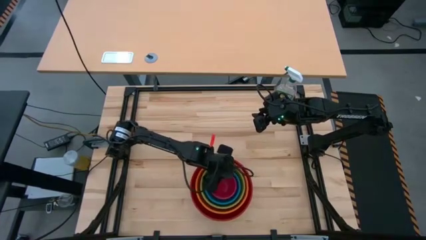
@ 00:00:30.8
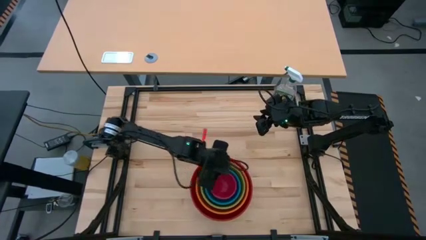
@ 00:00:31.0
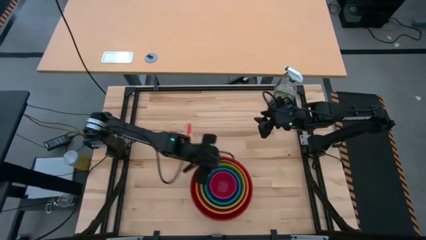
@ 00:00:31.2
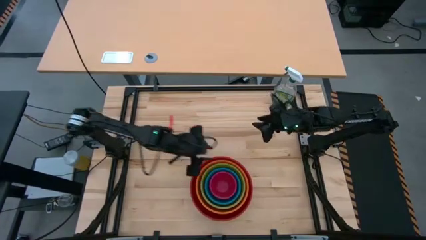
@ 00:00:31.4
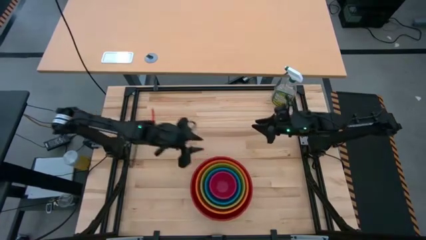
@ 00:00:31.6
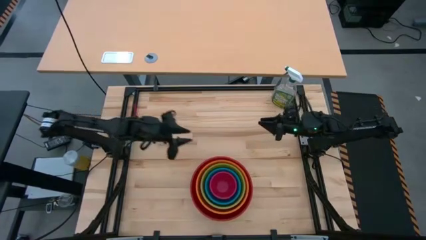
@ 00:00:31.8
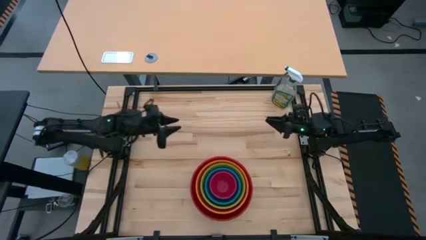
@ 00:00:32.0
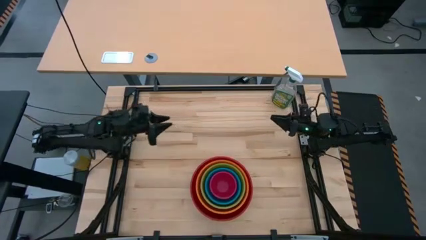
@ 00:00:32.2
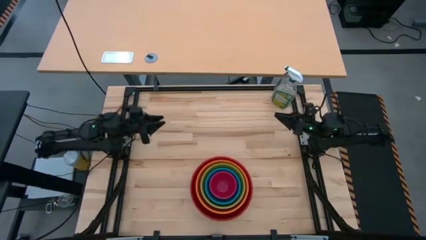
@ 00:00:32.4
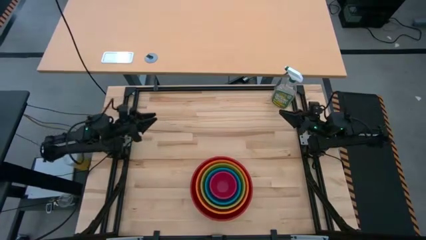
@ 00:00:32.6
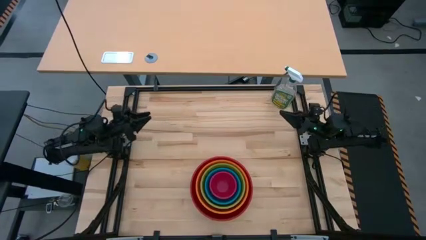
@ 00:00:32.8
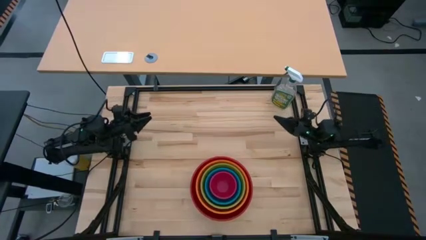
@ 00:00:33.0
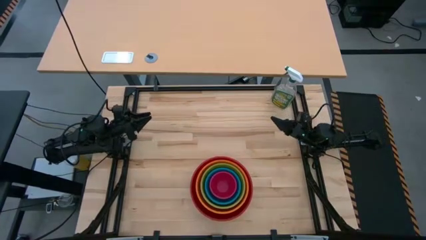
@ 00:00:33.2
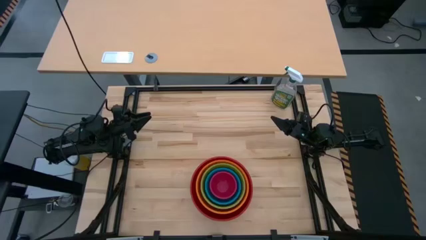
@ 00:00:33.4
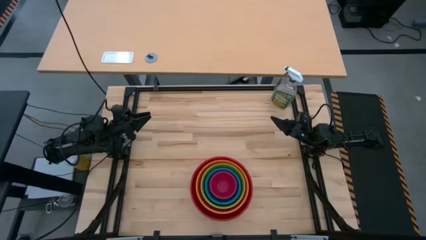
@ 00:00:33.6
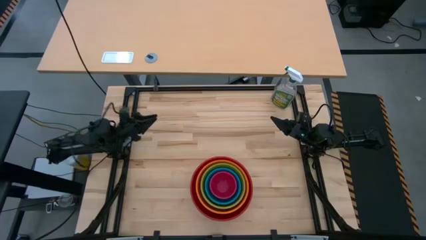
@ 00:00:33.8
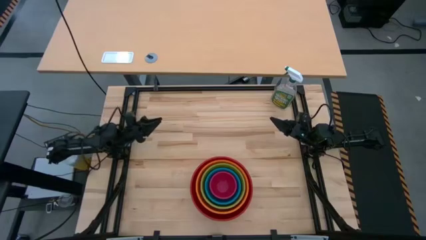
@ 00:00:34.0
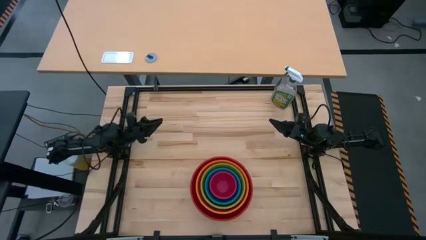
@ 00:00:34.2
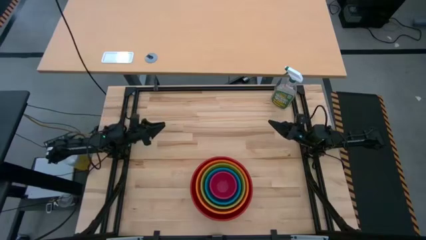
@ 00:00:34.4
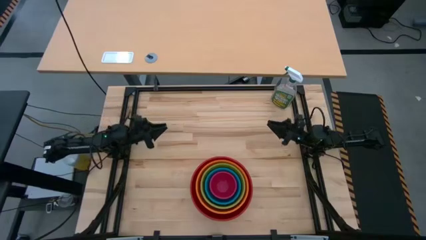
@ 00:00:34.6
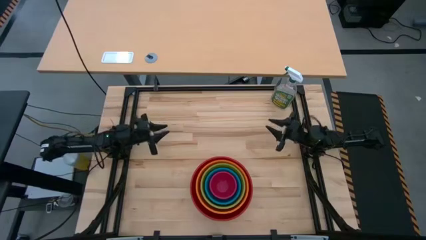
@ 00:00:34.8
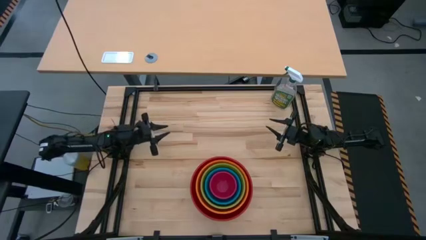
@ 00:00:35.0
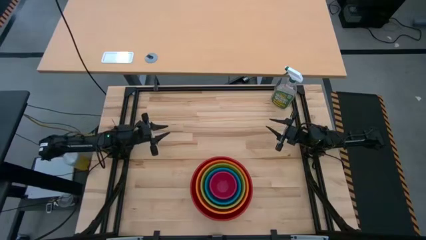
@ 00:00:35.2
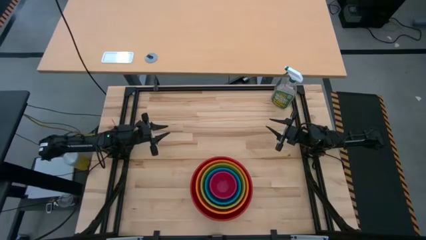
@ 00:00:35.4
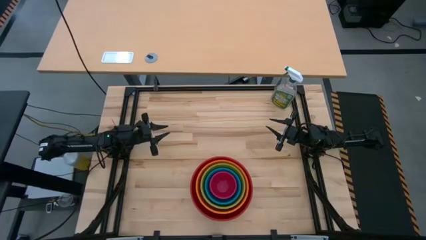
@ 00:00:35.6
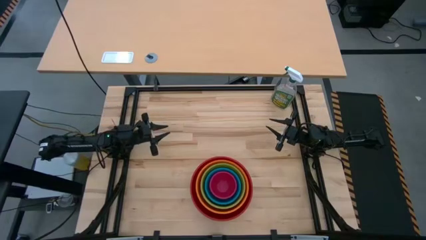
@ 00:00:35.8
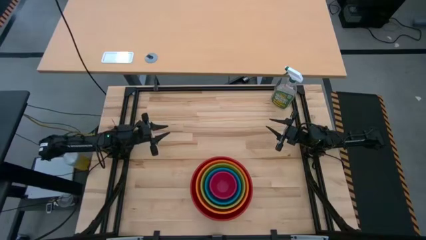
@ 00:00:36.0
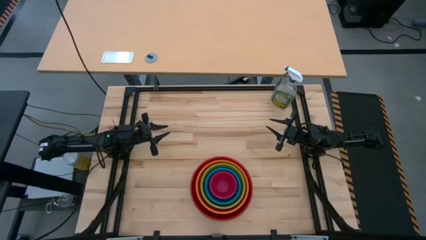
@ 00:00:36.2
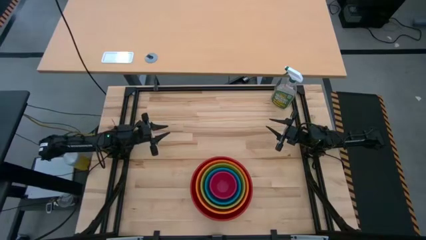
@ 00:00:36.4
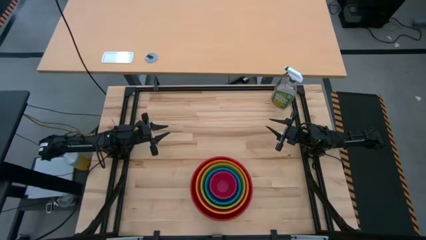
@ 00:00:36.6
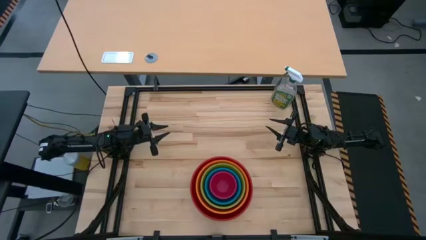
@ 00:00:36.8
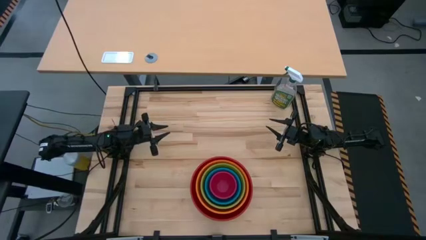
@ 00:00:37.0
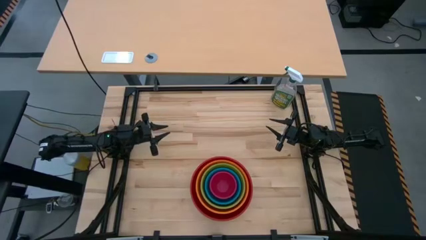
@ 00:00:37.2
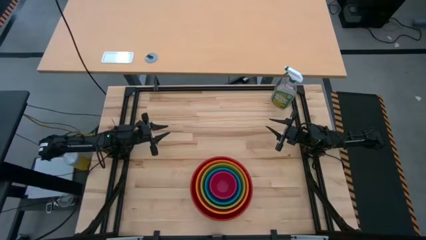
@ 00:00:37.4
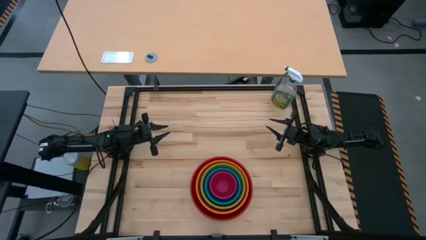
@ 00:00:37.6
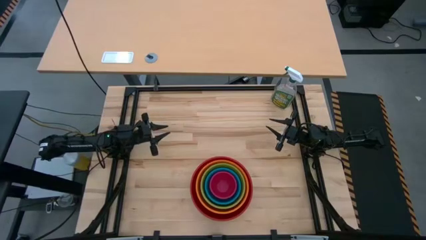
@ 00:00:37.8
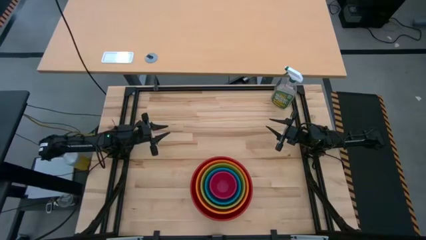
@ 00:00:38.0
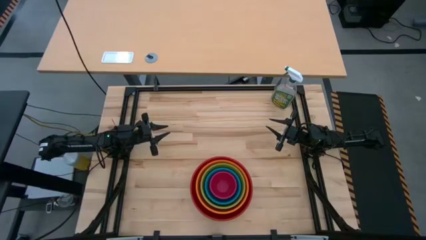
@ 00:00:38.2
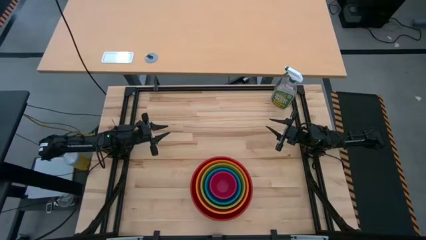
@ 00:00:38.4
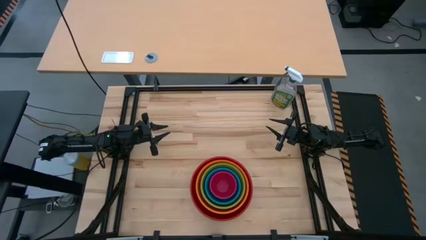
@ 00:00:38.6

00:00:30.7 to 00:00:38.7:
Return to Home Position

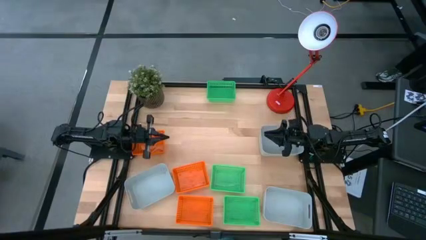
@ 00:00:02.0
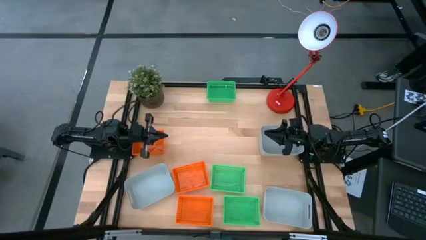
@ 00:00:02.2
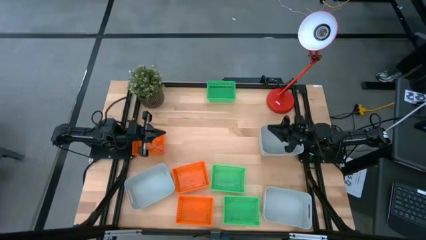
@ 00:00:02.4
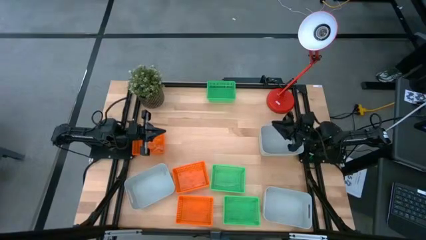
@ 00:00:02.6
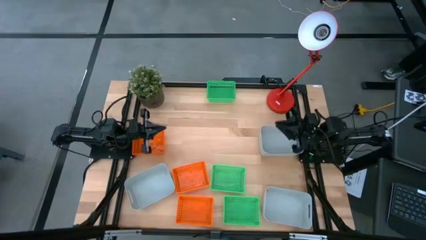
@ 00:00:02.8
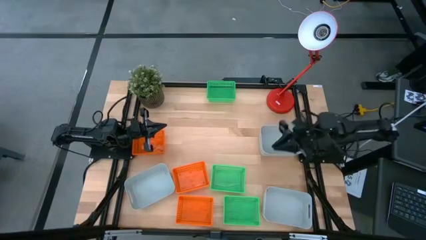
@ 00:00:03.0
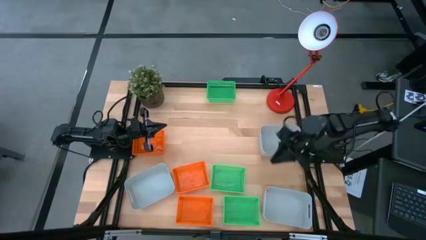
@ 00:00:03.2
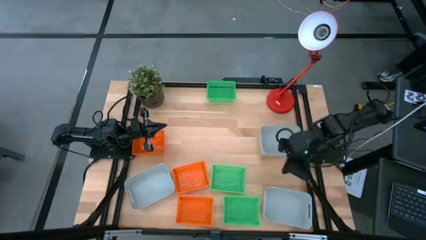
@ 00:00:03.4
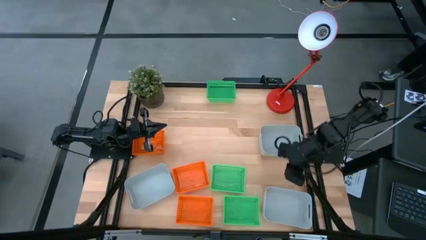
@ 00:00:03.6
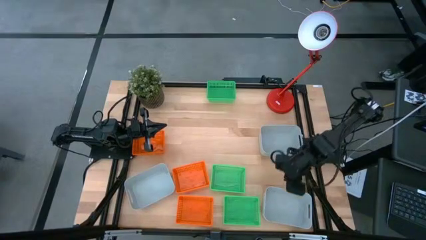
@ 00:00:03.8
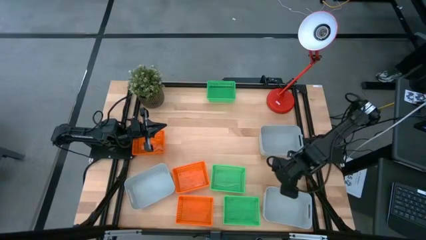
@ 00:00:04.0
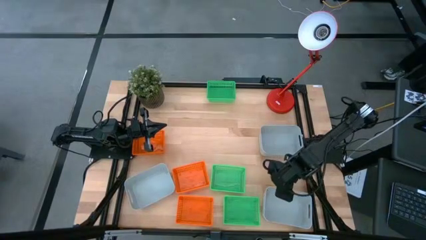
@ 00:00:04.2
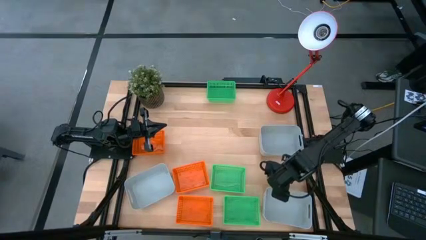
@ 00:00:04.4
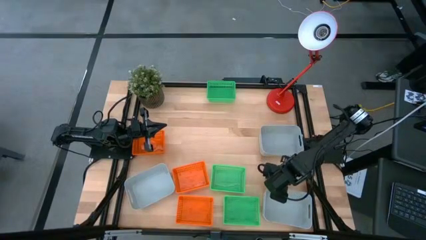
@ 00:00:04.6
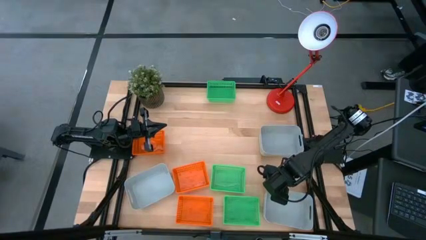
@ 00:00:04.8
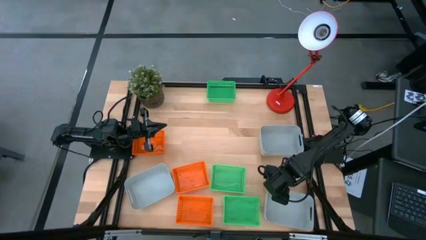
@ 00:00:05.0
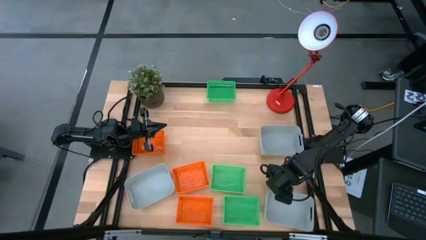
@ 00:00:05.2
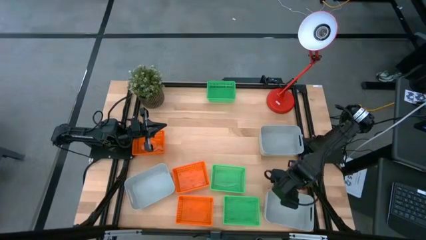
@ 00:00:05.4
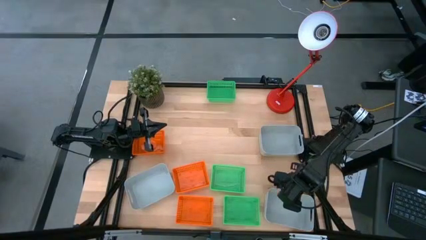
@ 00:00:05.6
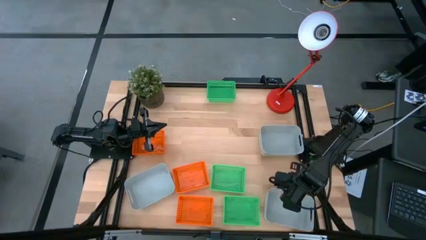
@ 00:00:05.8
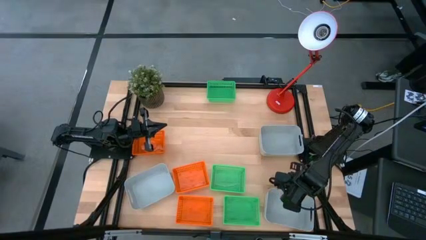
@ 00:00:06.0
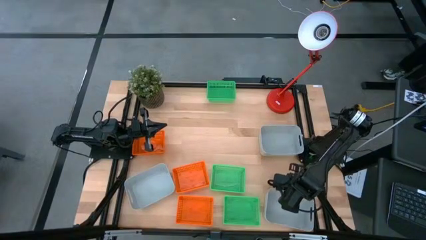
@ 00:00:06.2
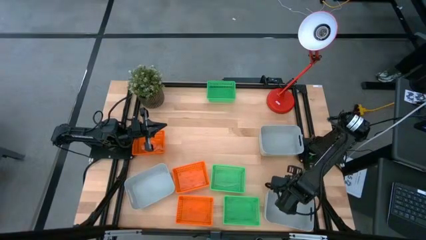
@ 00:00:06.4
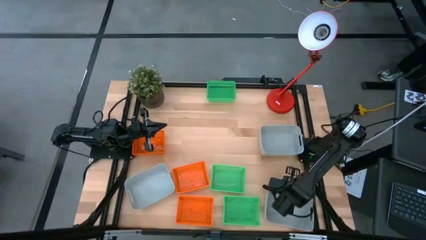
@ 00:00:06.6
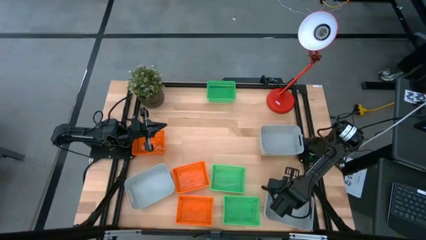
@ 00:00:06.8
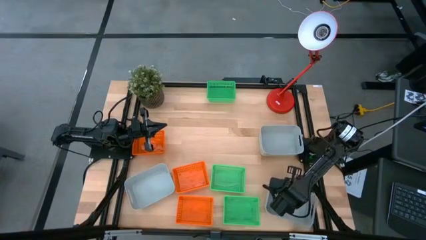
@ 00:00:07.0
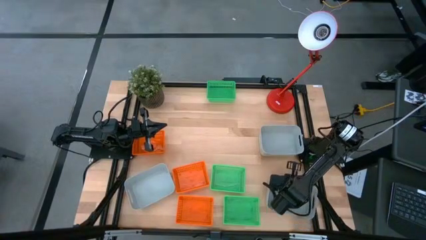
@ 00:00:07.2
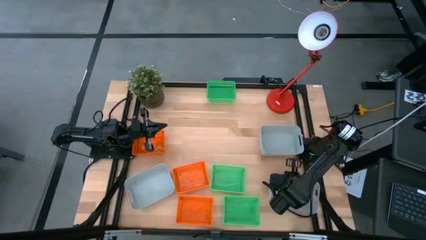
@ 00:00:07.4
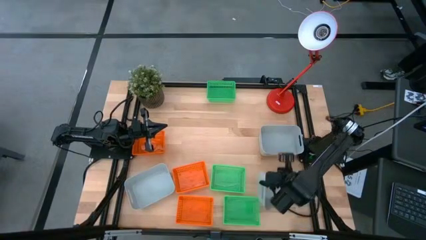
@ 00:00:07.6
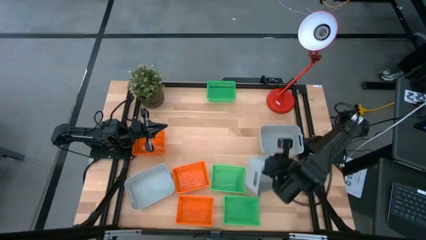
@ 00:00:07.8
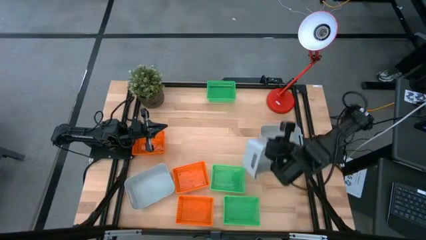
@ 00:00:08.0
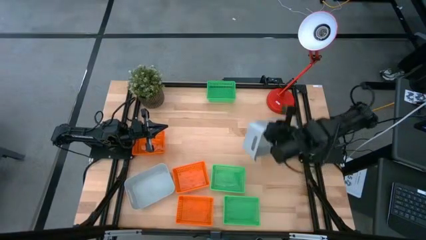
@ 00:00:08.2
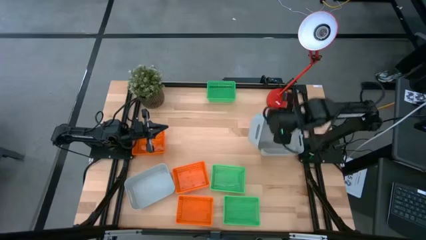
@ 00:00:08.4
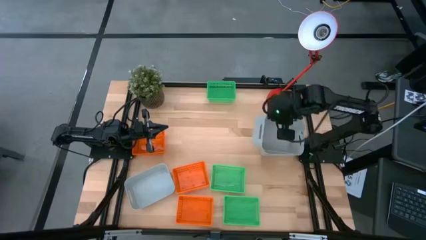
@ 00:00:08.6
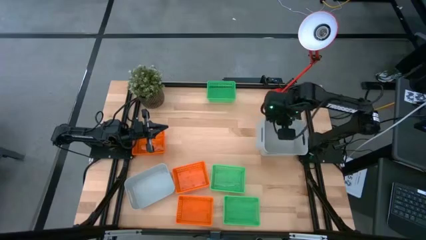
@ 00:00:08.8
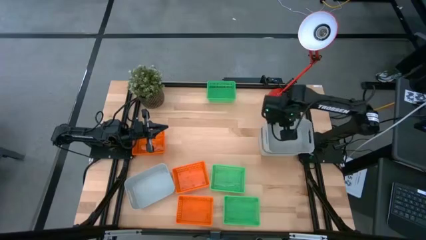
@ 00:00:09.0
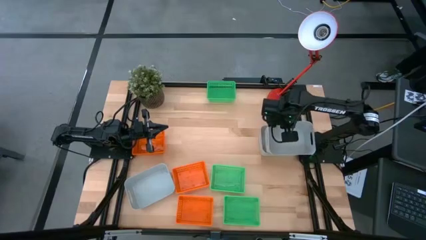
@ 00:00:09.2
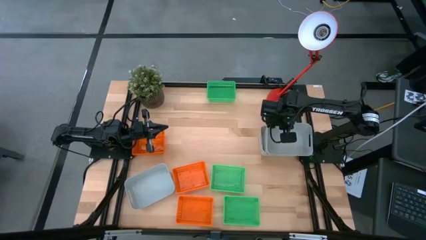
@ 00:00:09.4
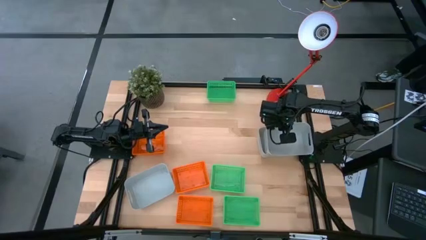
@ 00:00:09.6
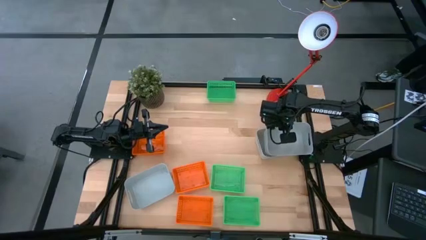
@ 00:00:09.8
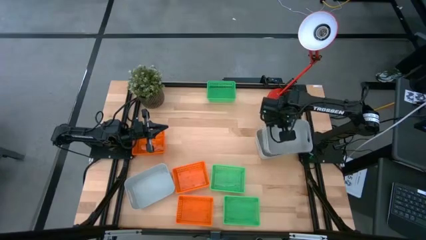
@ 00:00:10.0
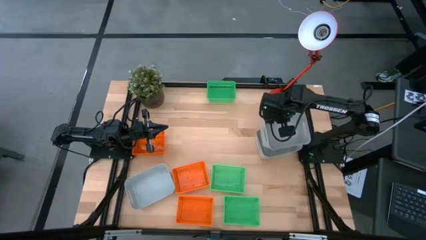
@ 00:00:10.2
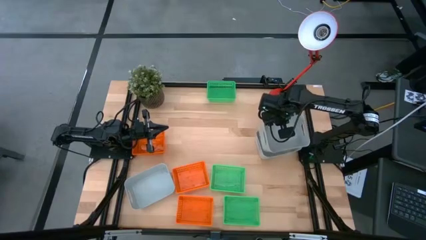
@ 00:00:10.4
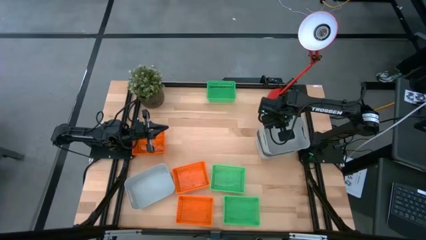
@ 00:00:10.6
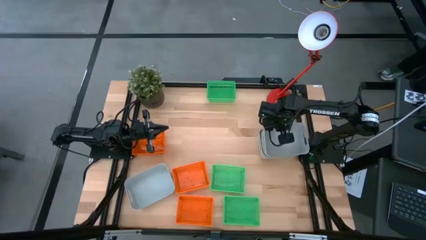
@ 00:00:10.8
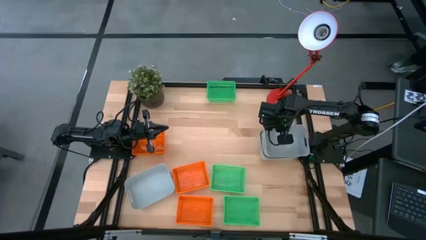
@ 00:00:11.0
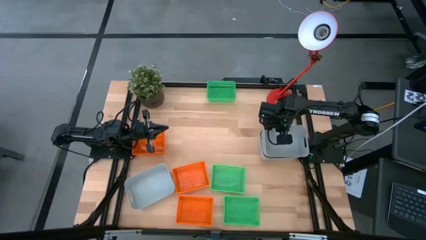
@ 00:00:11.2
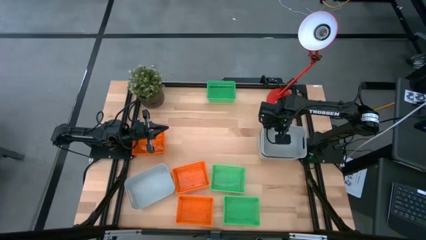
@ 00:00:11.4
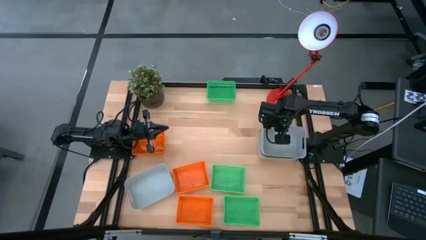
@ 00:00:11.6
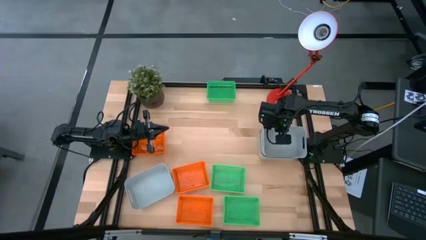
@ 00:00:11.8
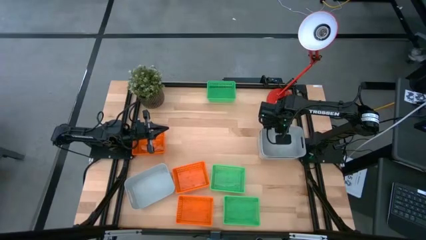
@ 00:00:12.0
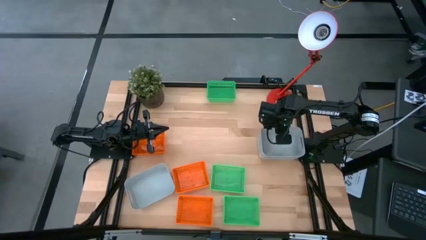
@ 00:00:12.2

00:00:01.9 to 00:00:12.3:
Stack the bottom right gray bin onto the top right gray bin
